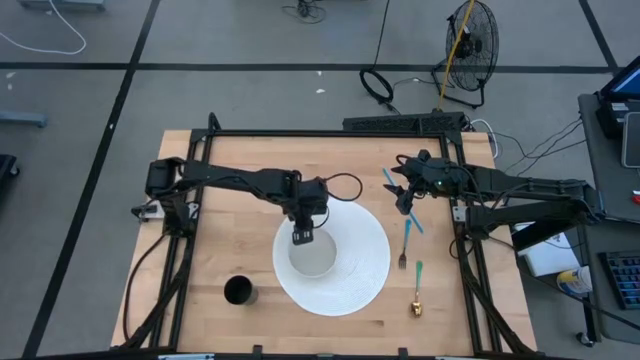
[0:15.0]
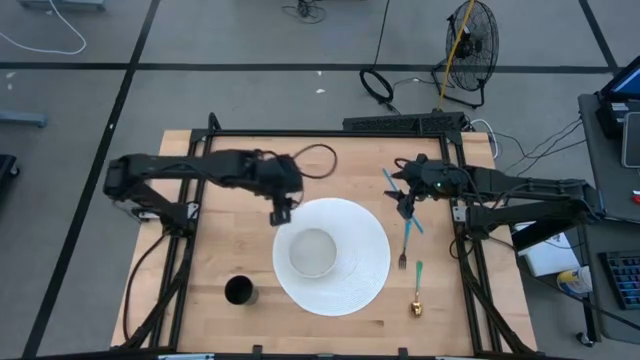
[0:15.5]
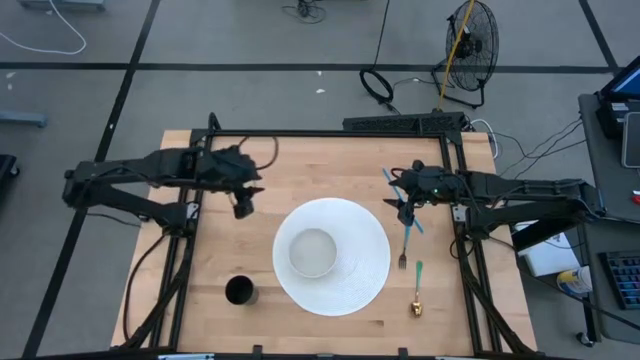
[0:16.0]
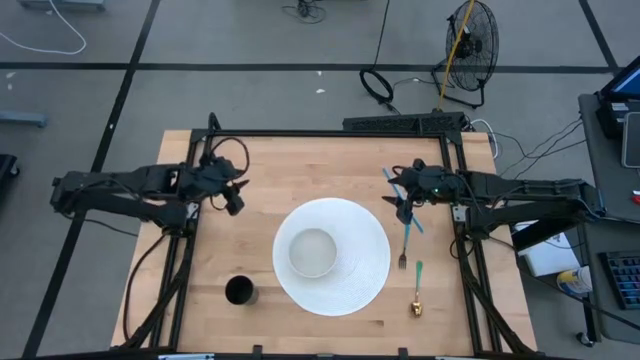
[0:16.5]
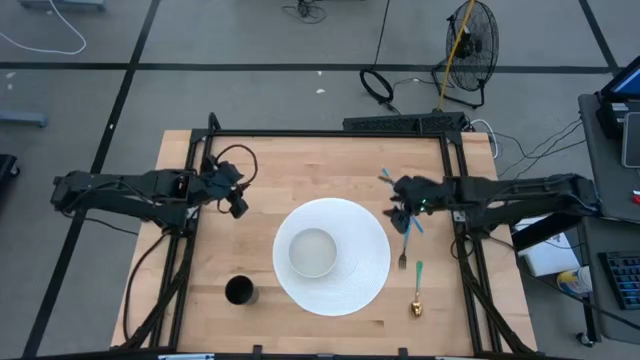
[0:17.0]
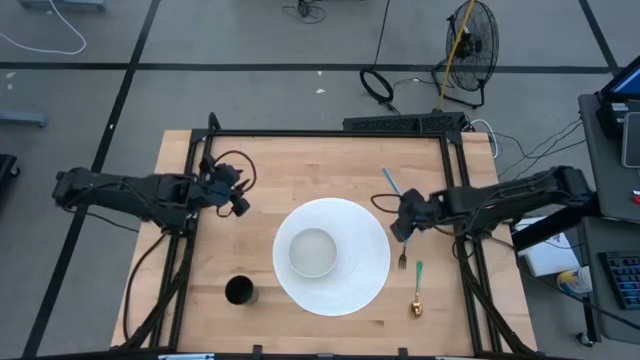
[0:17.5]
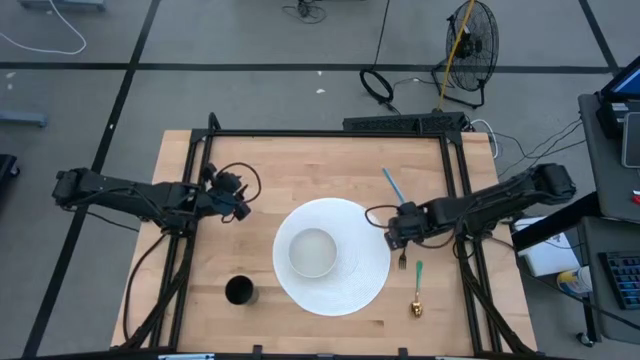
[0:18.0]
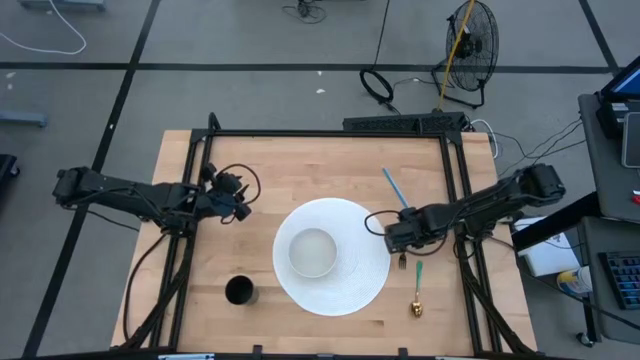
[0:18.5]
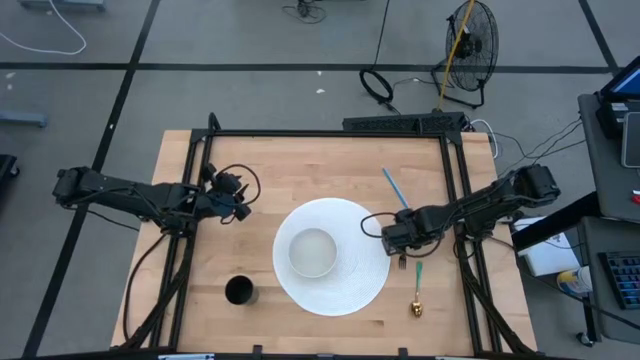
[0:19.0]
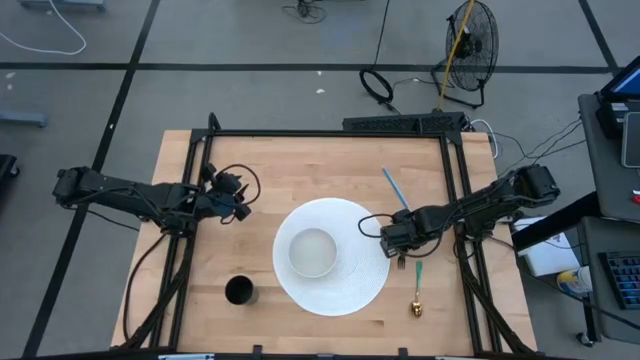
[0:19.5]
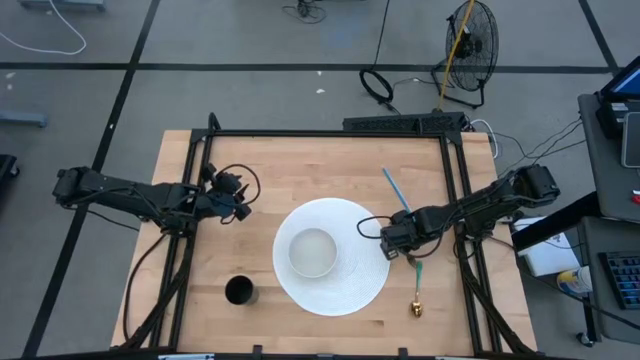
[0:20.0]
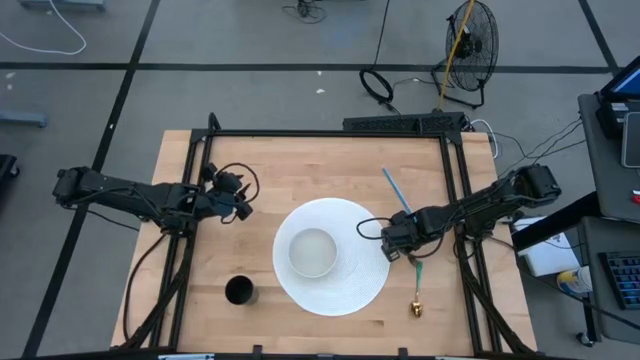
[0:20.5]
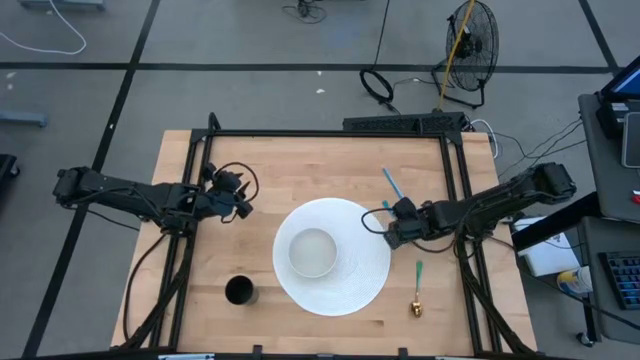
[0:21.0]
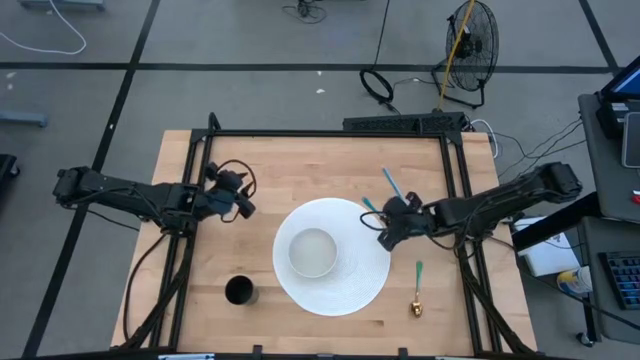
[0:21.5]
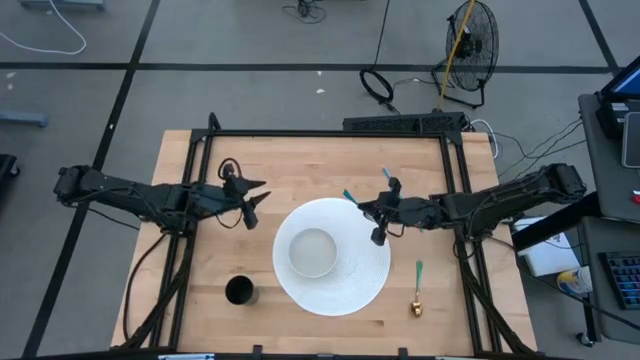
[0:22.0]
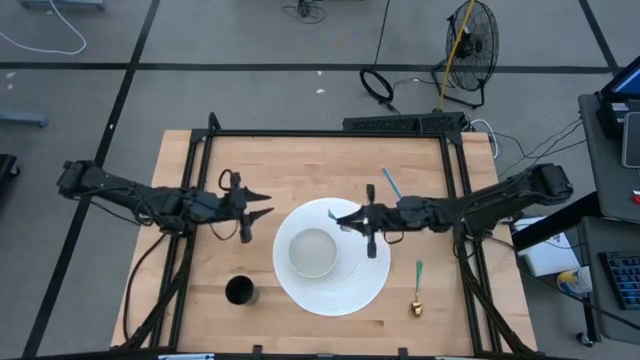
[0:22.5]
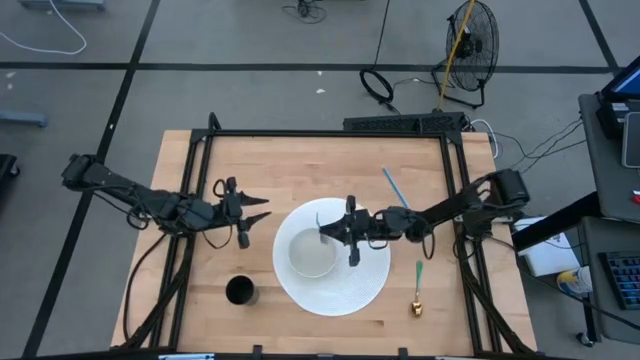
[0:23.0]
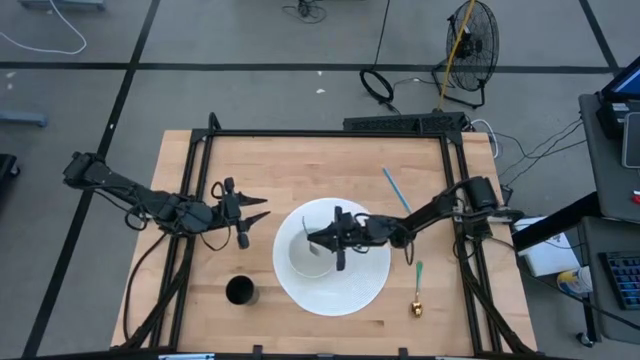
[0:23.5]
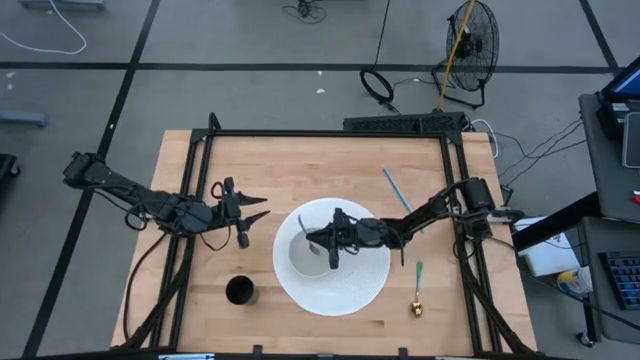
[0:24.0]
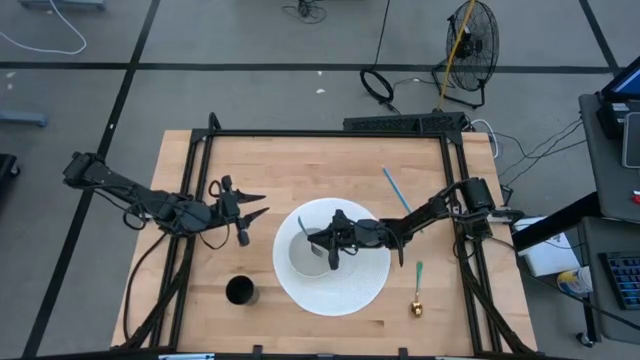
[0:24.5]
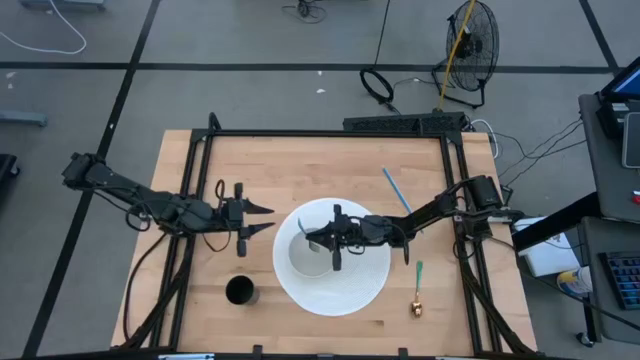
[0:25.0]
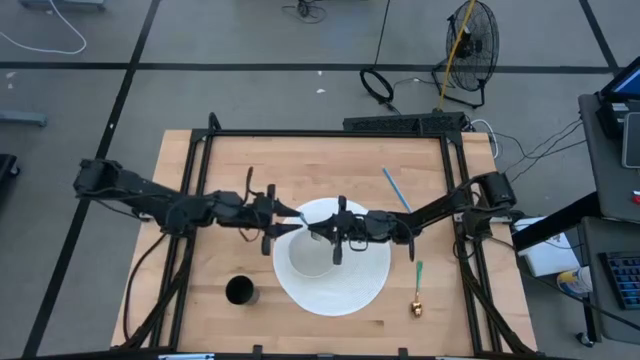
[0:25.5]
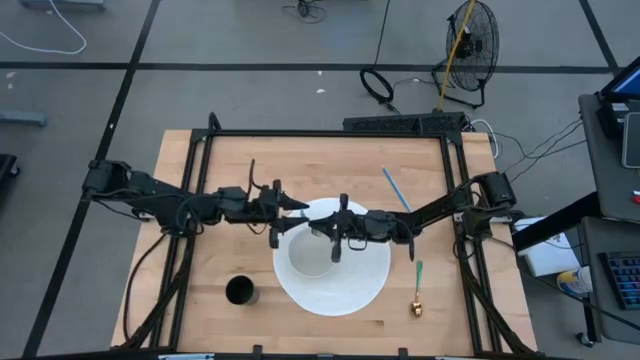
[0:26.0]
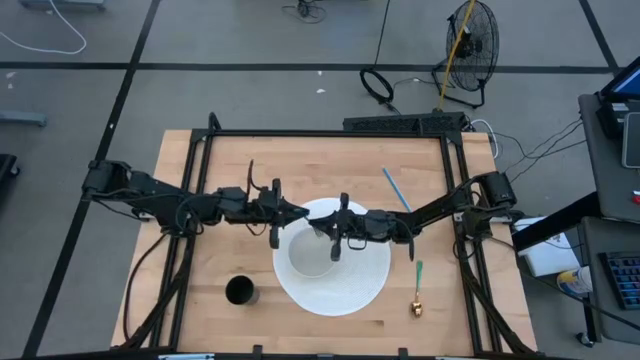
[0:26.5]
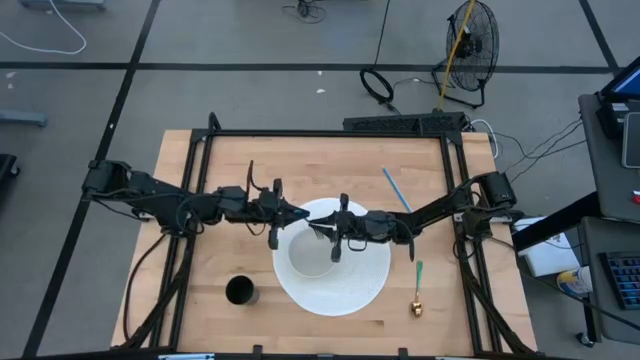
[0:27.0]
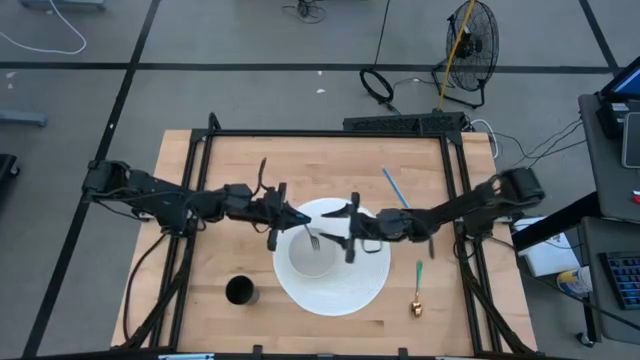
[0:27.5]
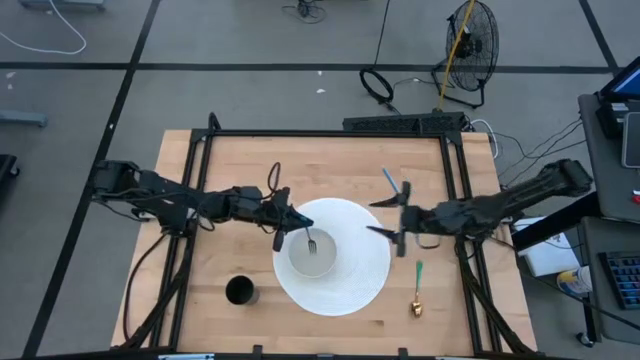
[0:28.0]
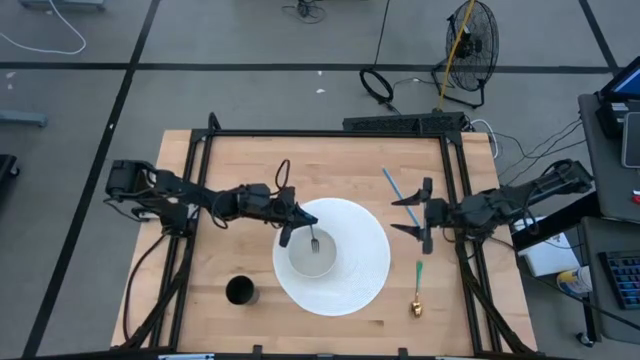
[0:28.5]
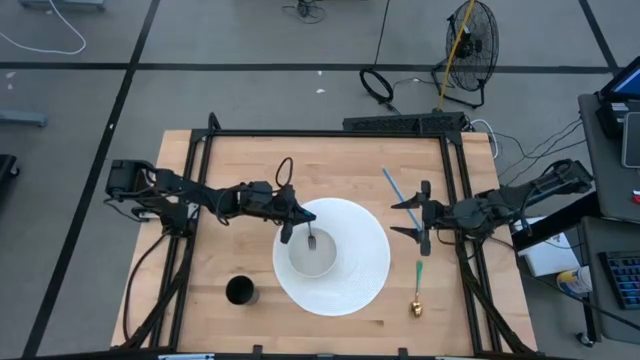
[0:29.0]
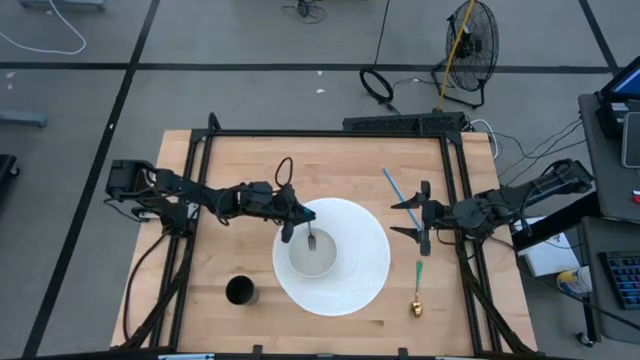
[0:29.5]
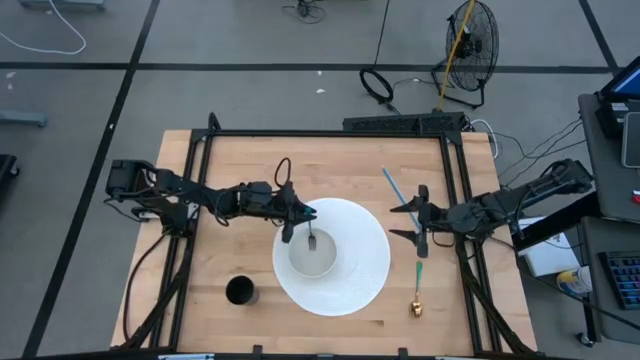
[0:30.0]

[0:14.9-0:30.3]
Task: Pick & Place Utensil
Put the blue fork into the white bowl

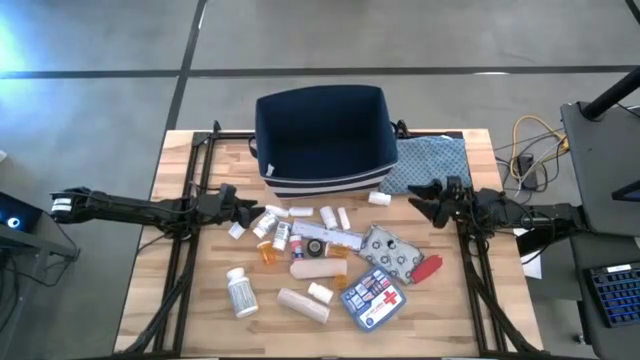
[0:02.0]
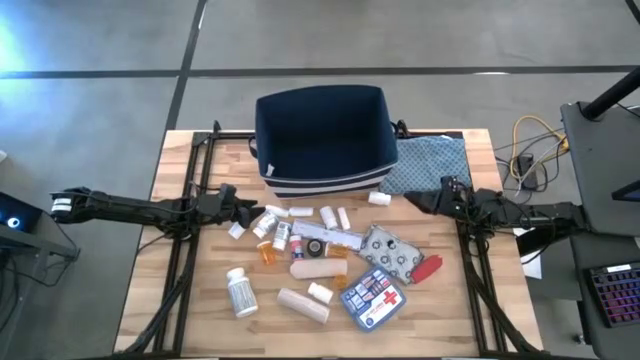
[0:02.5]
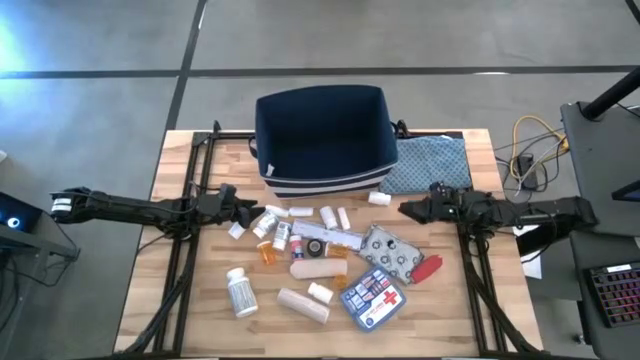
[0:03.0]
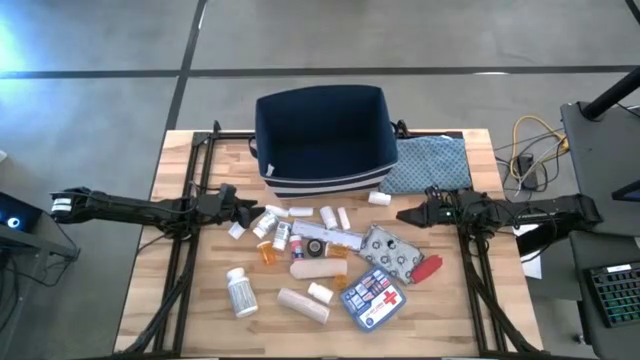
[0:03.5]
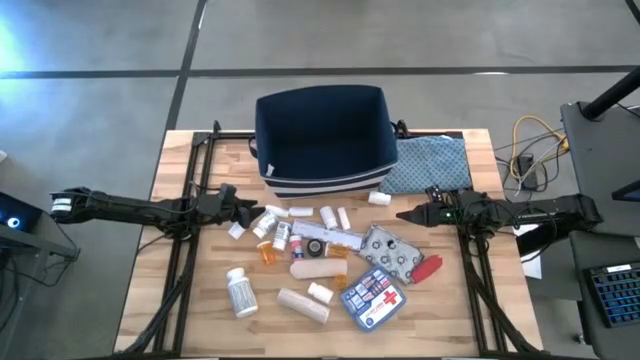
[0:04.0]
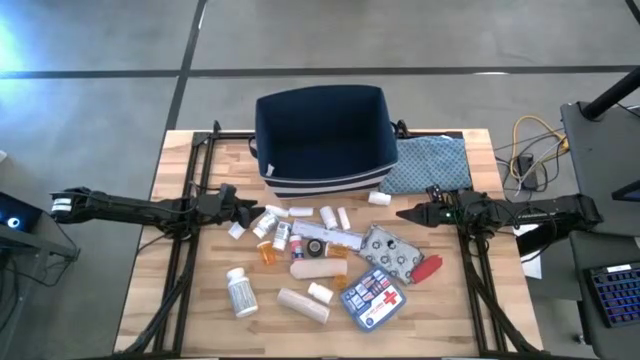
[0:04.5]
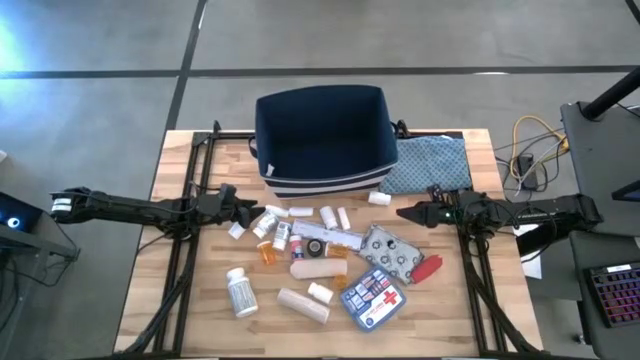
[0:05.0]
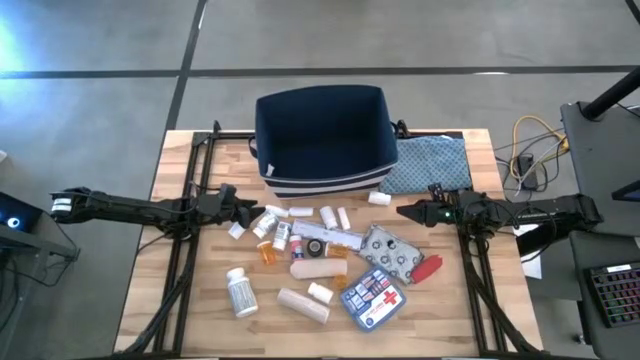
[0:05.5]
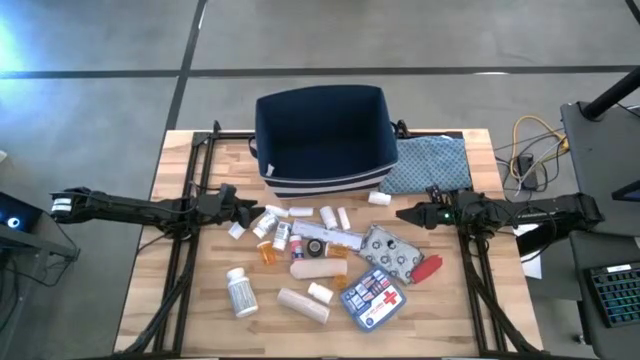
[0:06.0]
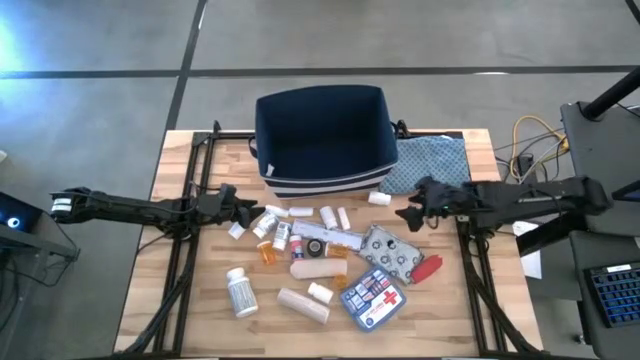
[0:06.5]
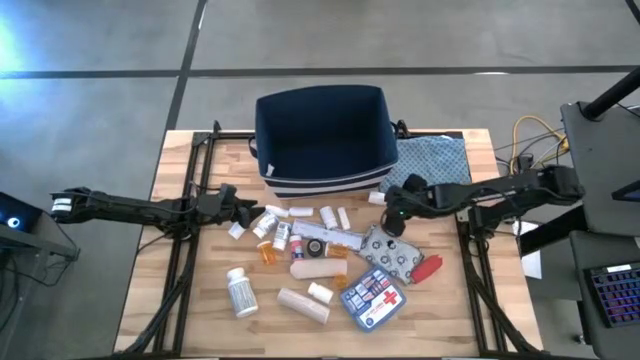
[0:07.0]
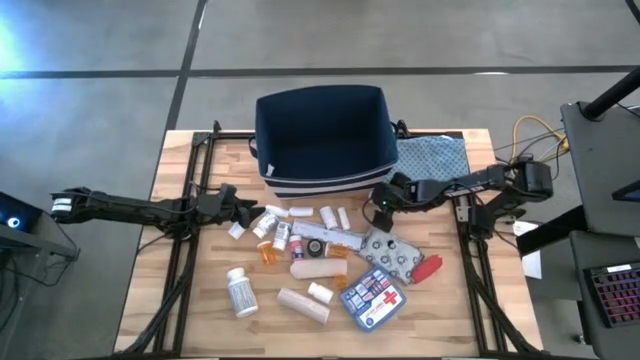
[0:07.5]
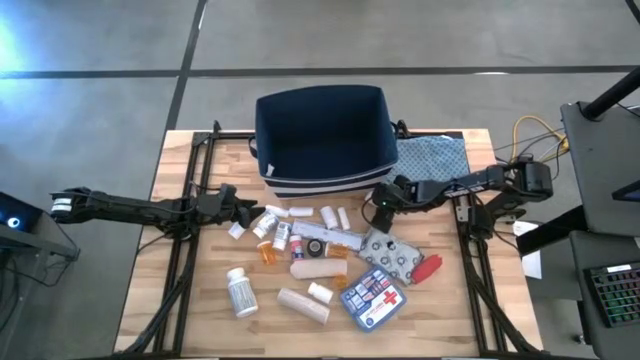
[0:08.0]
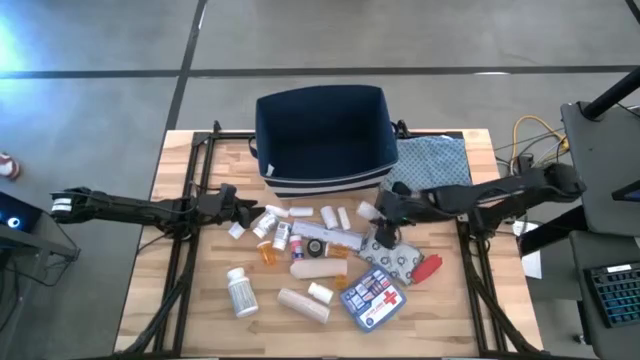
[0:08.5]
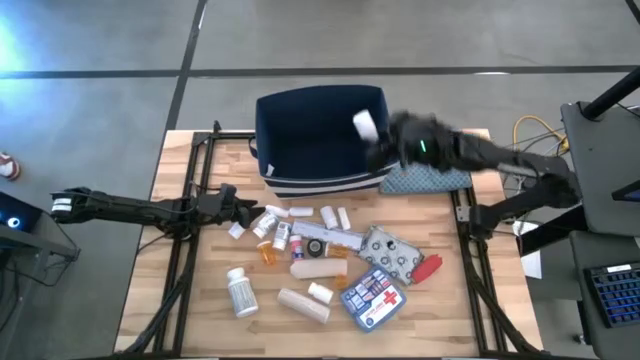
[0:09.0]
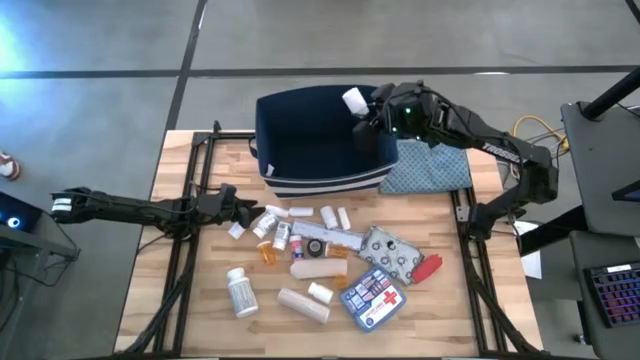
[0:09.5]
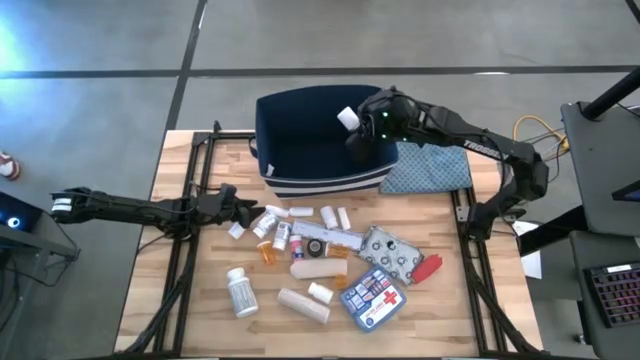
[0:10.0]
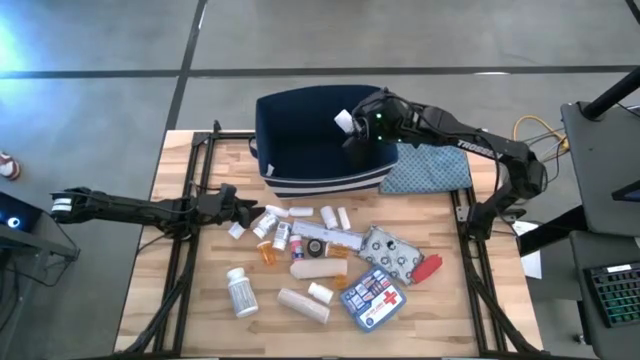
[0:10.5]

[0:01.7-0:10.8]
Task: Pick & place medical supplies in basket/bin
Put the white medicine bottle into the blue bin
